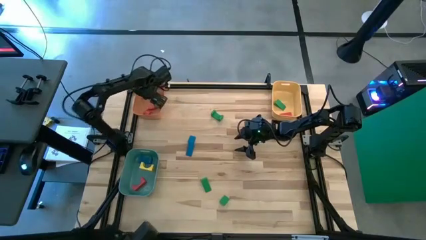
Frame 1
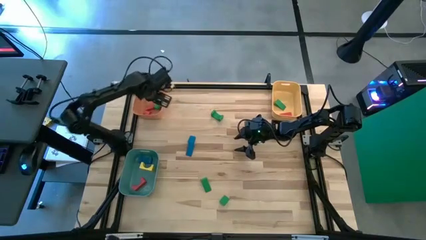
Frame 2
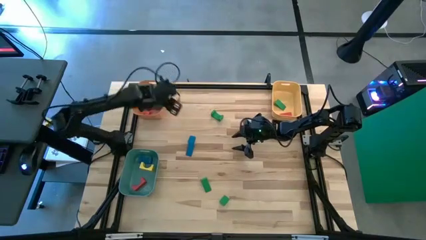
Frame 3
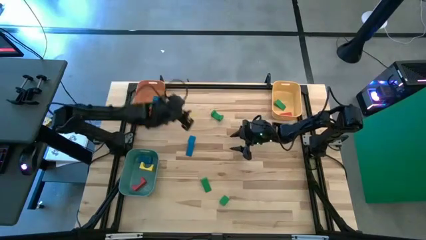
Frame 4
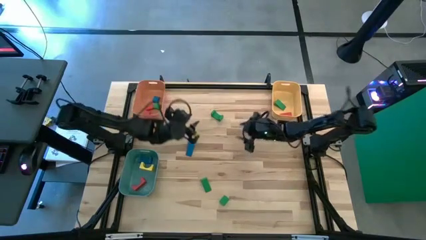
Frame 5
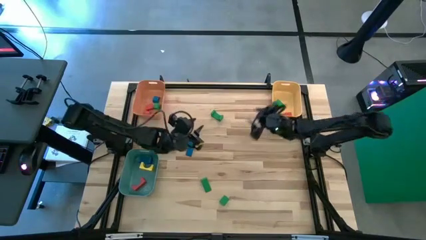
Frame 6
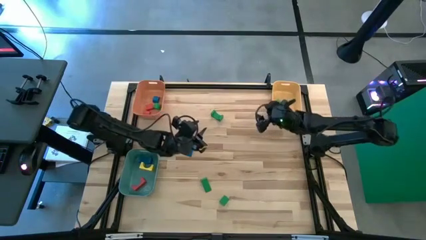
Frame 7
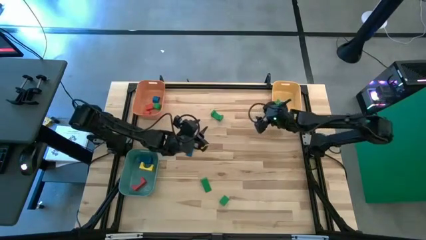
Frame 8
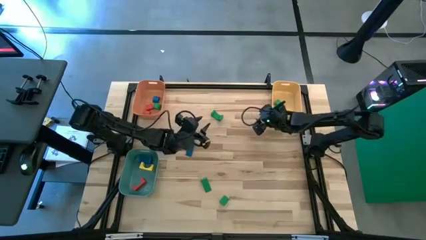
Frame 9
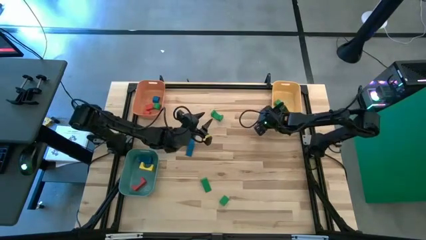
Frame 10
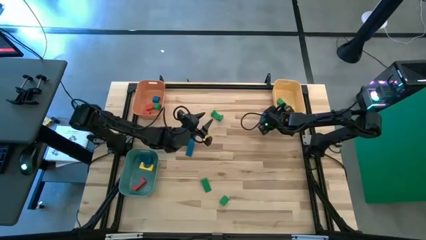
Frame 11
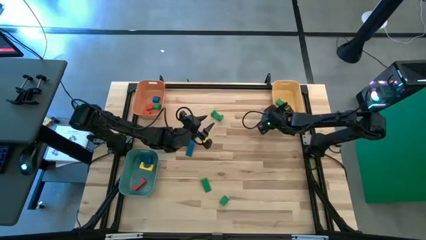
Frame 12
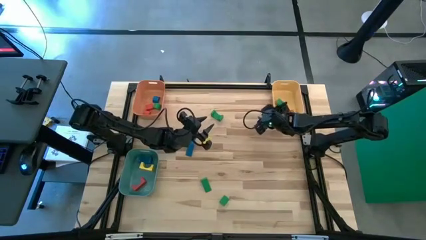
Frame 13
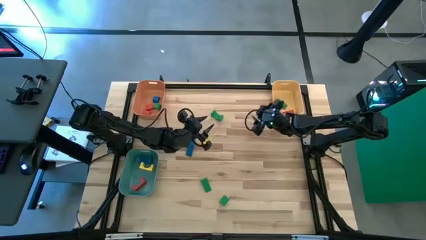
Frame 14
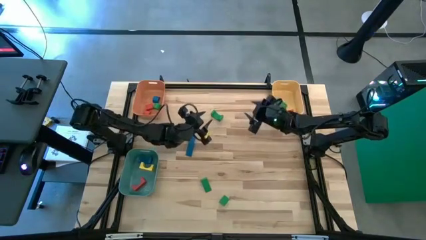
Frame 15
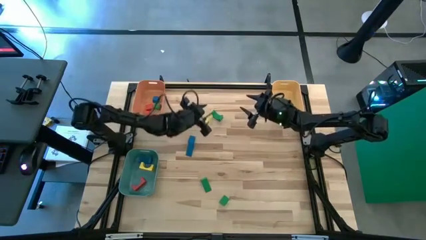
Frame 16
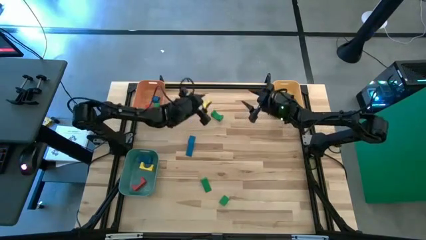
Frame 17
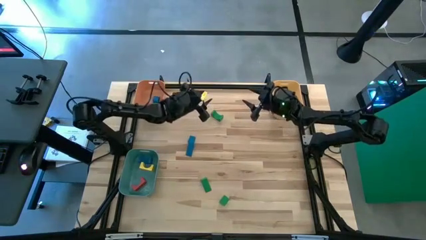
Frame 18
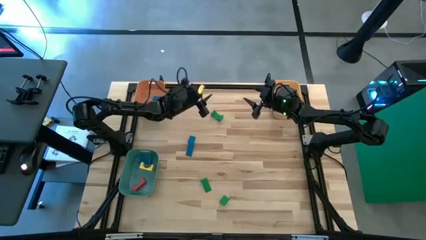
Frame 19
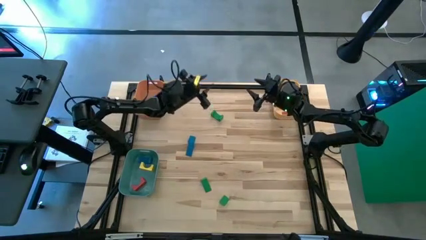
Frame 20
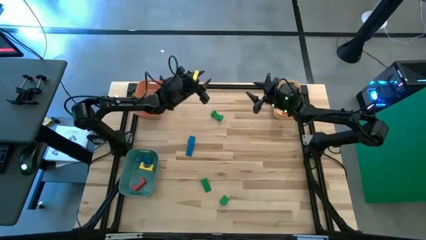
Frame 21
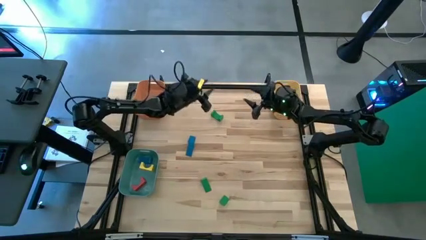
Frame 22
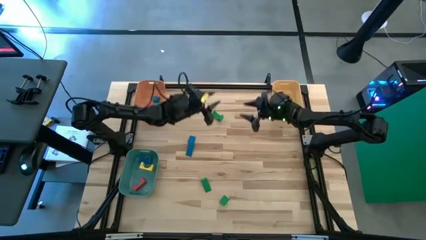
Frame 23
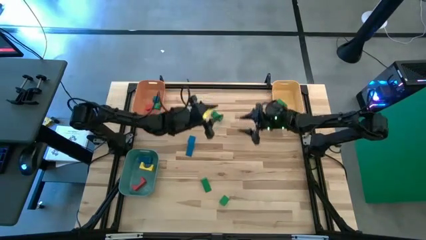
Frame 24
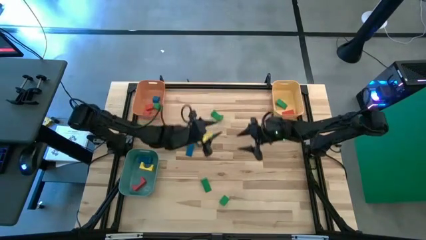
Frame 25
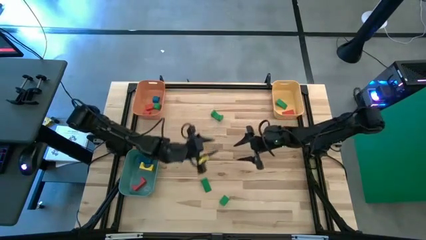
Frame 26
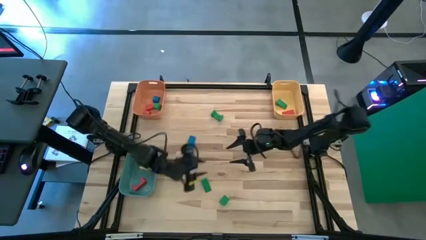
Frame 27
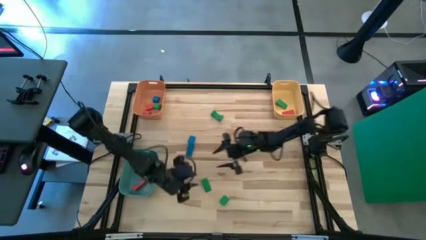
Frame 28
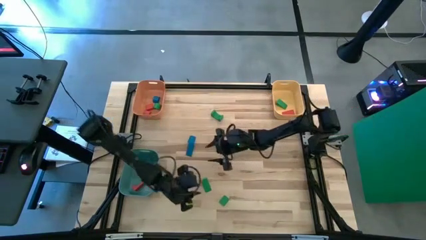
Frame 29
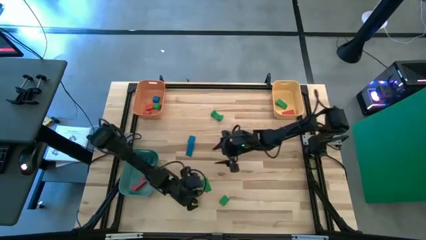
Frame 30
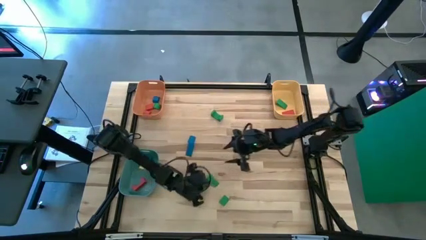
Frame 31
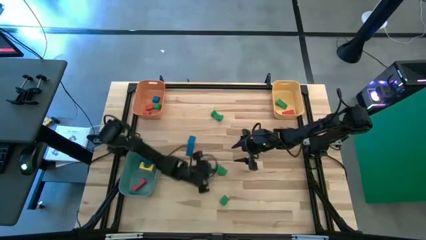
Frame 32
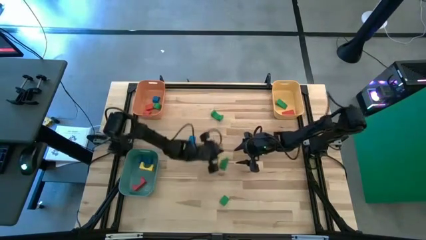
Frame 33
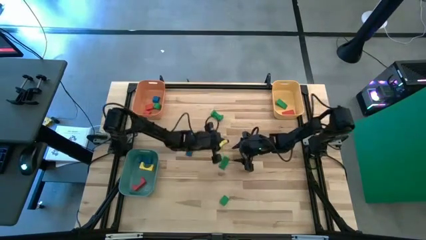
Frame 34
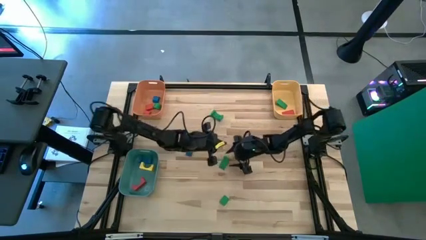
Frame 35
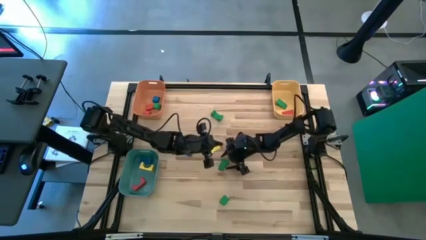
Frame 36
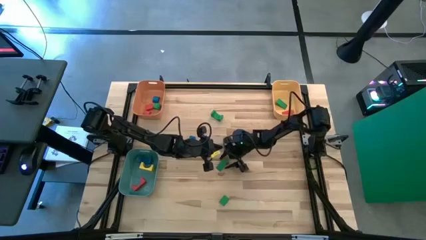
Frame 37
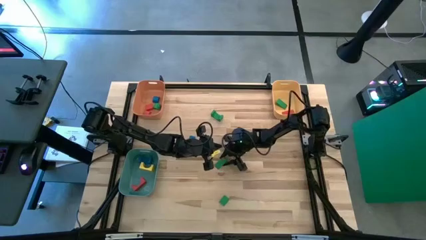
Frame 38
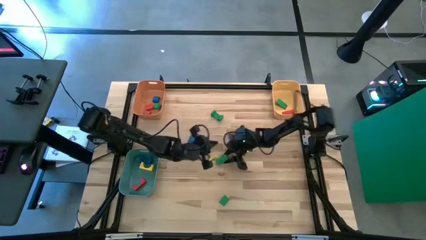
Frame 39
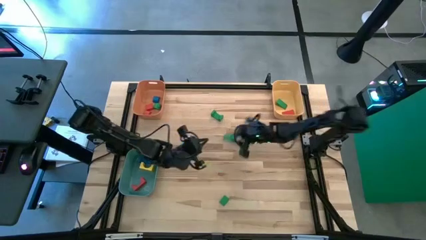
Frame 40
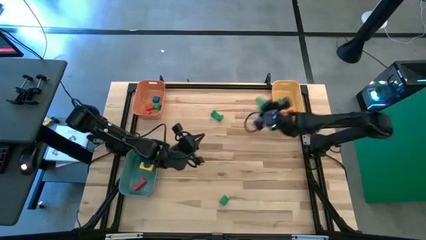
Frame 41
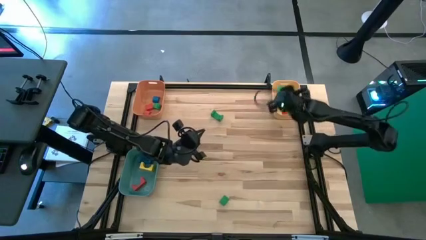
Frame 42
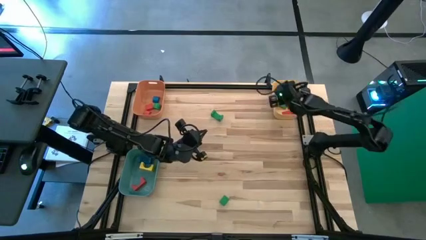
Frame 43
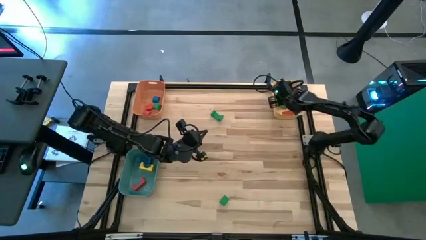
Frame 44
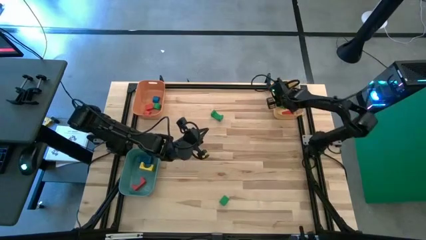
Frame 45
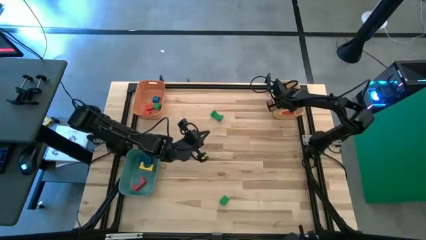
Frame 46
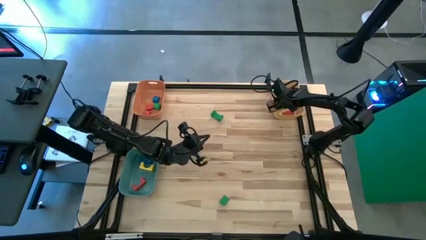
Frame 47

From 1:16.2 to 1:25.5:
Task: Sort blocks by size
Put the green triangular block into the yellow bin

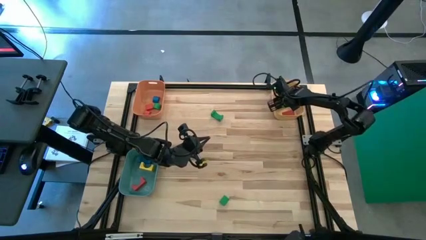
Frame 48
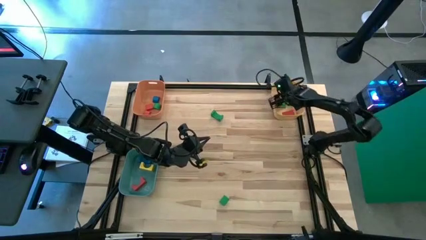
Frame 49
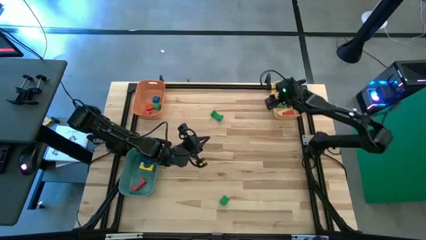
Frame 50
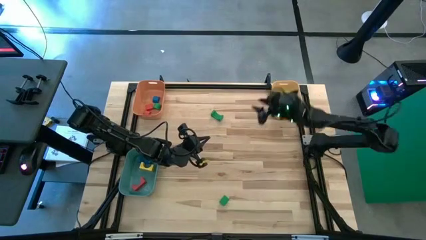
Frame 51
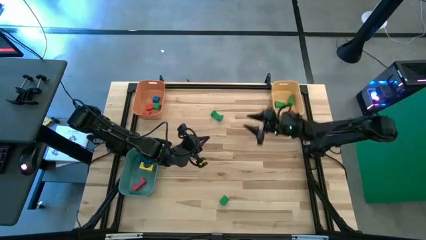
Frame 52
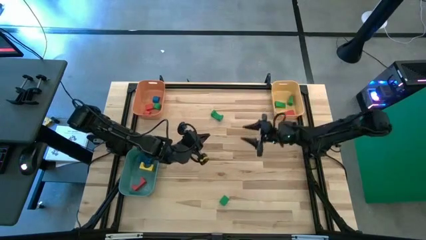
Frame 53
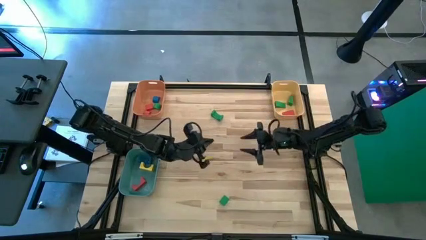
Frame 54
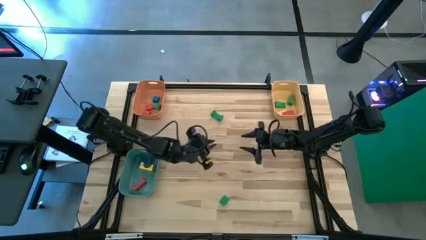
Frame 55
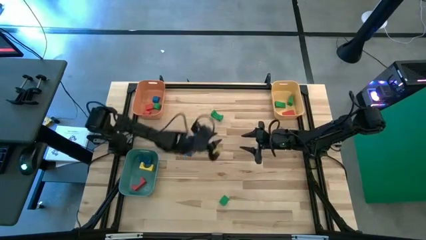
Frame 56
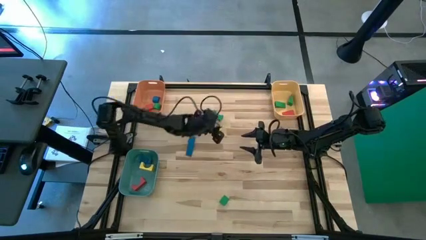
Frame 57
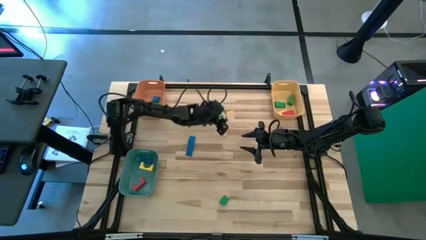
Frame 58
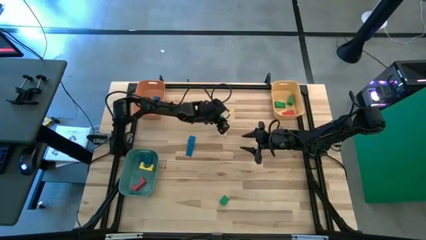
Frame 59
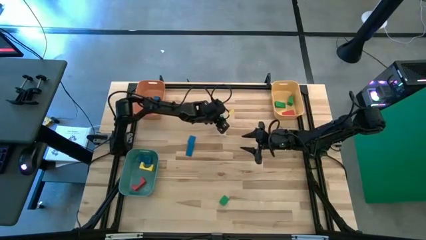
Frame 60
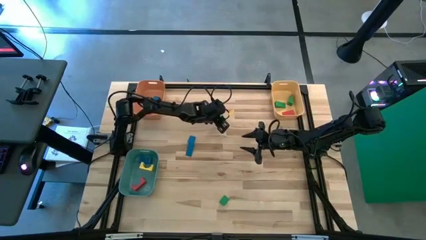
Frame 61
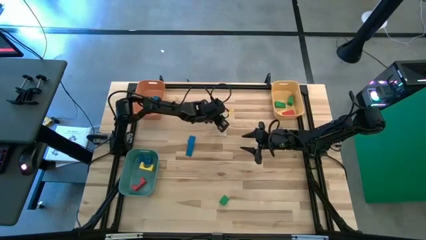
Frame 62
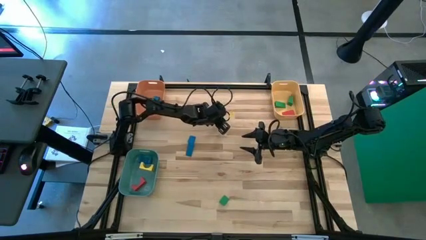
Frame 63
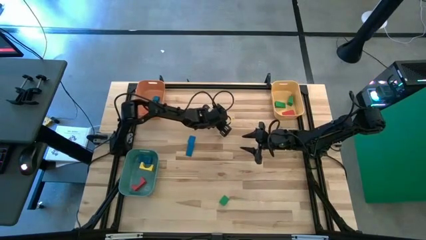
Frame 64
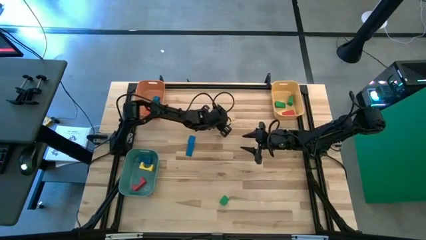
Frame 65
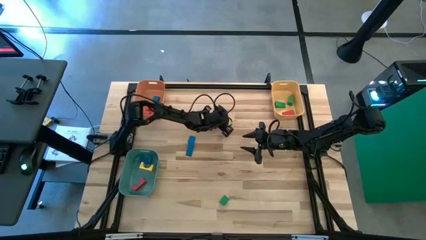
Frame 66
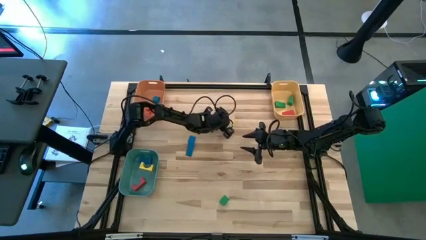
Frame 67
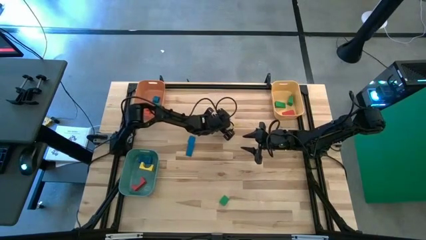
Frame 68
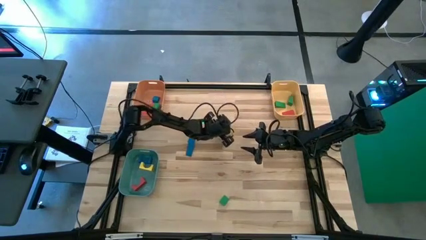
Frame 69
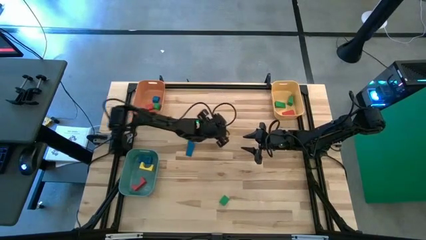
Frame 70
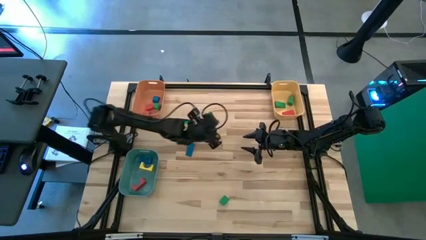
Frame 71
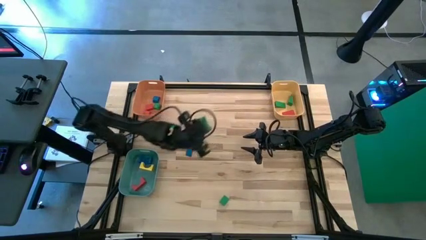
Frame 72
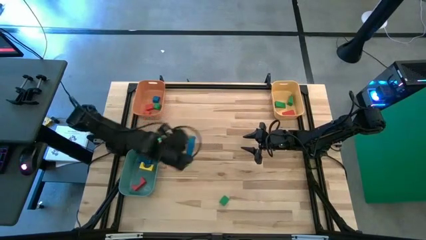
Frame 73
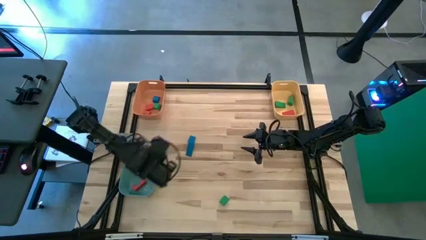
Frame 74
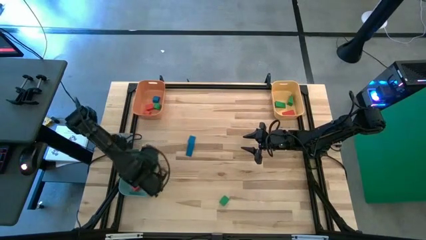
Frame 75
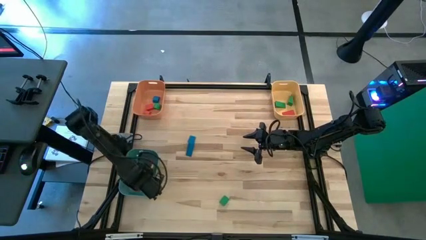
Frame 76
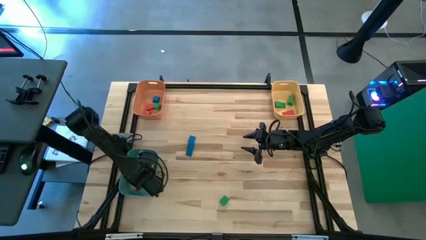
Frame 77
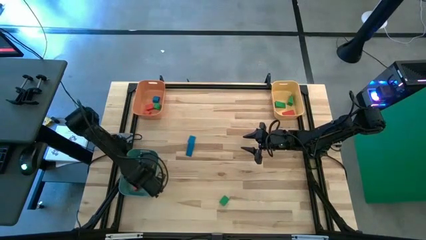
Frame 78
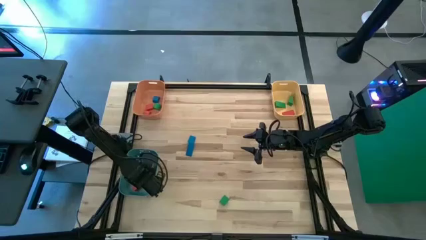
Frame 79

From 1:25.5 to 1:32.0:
Put the green arch block into the blue bin
